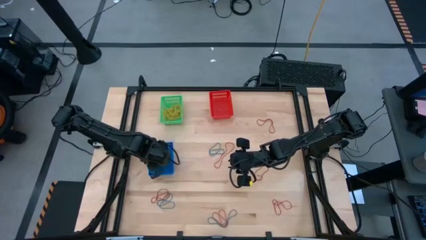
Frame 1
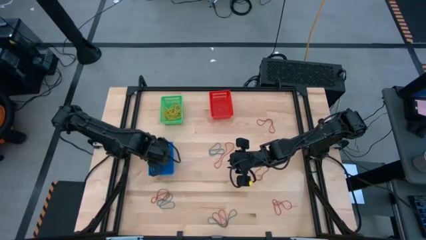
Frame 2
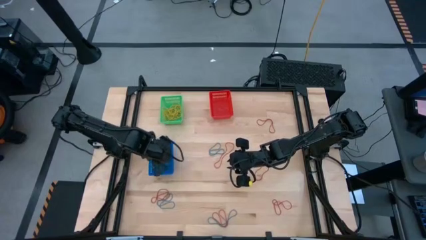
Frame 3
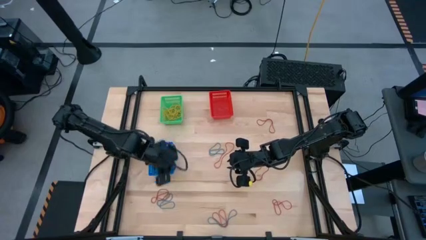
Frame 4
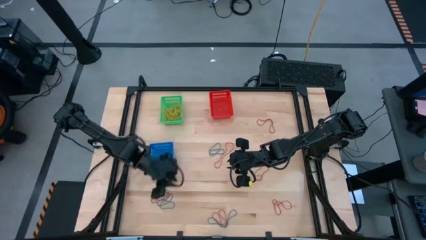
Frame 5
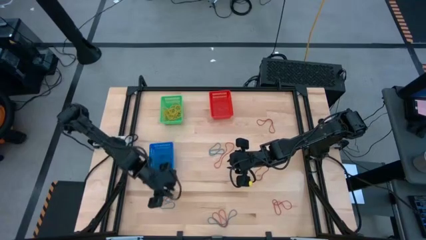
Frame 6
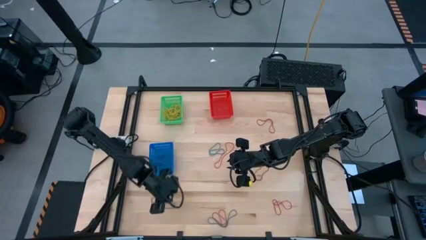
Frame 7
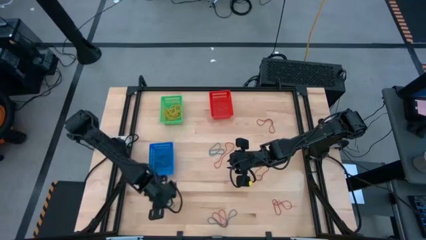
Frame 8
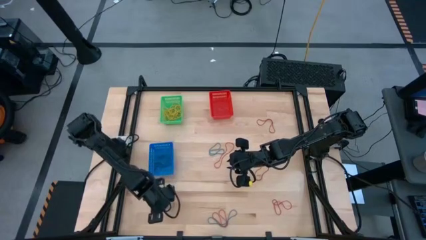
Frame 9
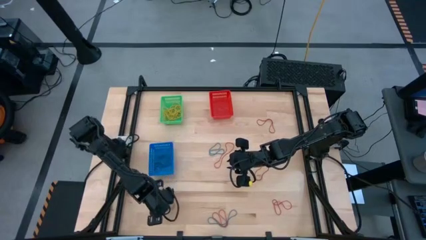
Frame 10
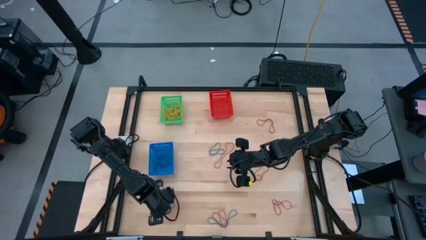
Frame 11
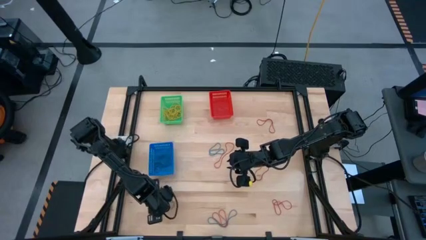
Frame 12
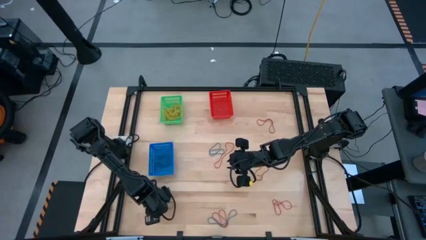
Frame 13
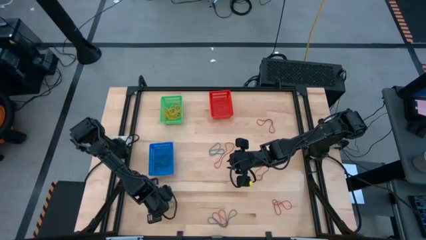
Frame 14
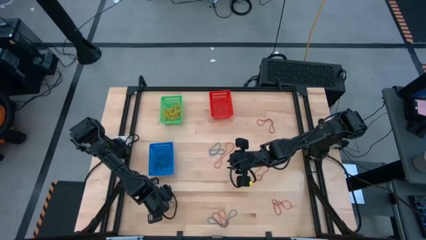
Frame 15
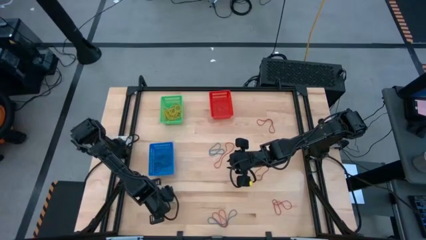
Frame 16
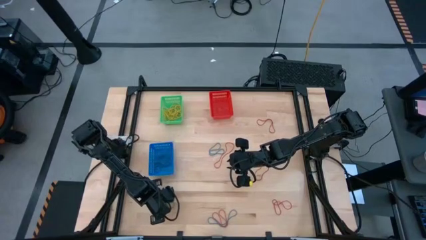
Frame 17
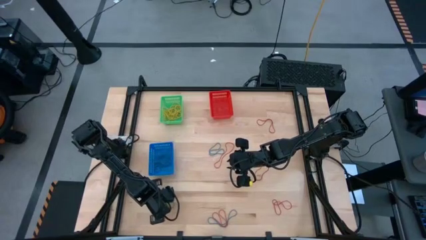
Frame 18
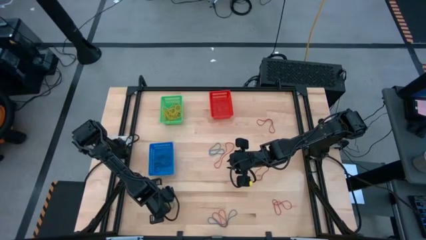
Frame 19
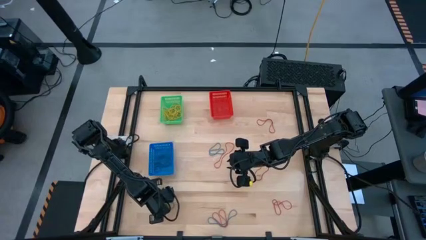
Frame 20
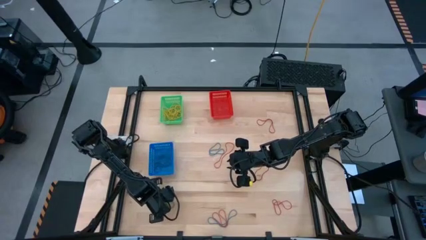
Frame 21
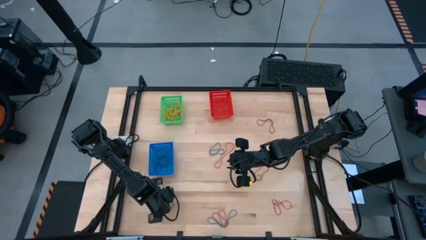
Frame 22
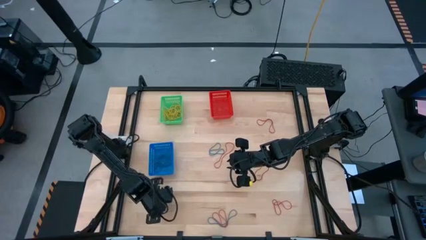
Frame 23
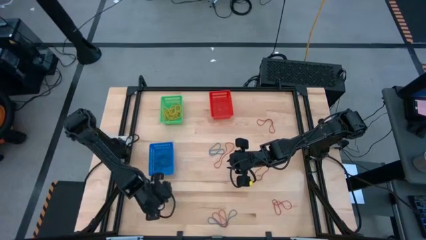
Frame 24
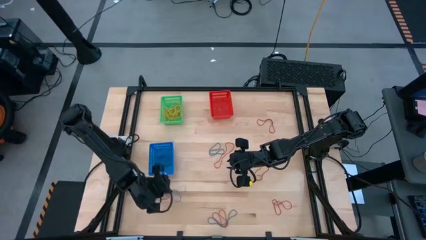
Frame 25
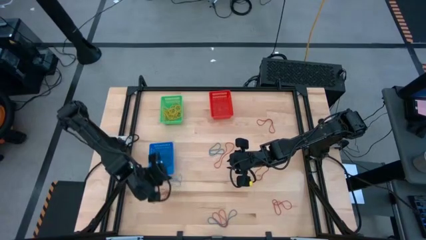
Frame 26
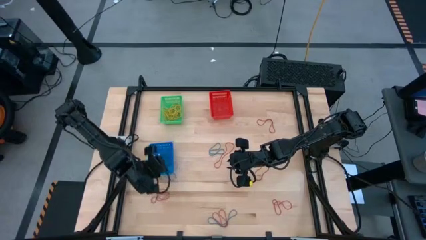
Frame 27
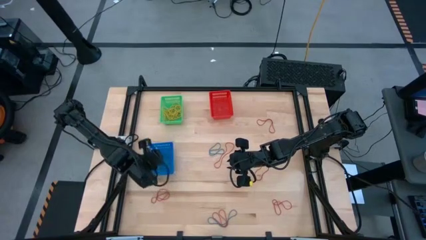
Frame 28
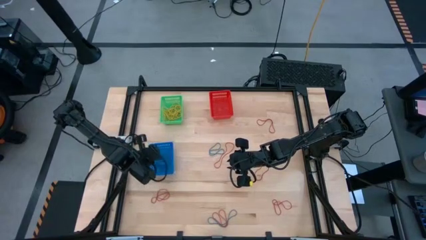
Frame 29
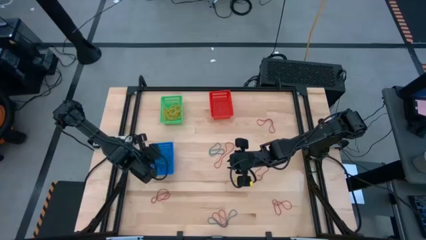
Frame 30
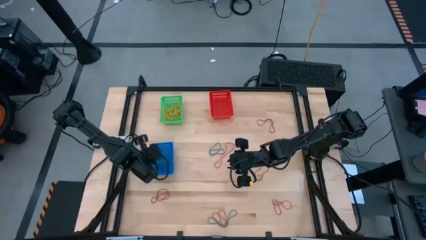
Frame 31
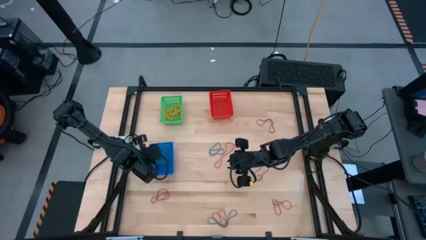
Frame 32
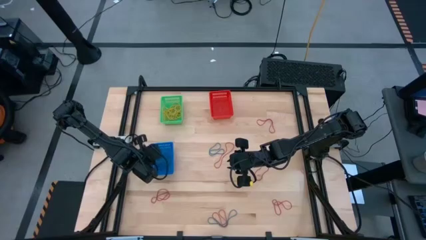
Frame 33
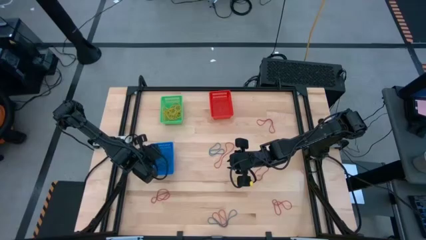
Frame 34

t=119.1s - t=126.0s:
Task: Sort rubber bands into baskets
Put the blue rubber band into the blue bin

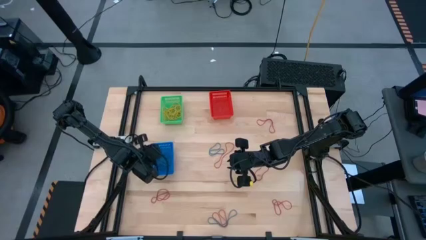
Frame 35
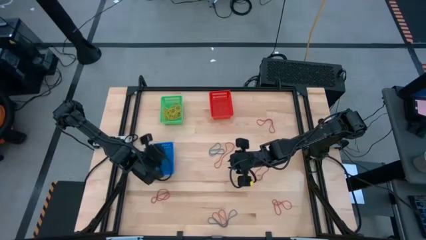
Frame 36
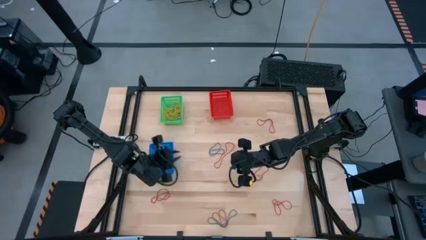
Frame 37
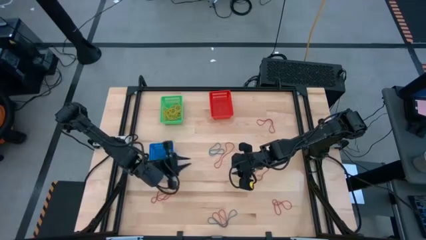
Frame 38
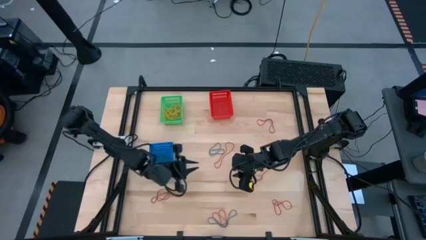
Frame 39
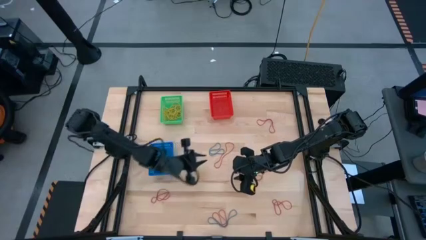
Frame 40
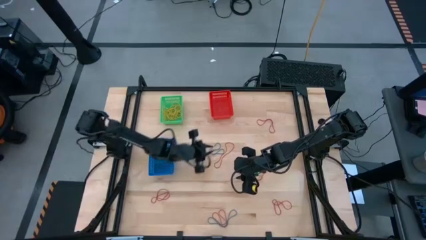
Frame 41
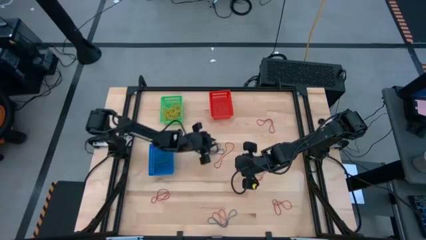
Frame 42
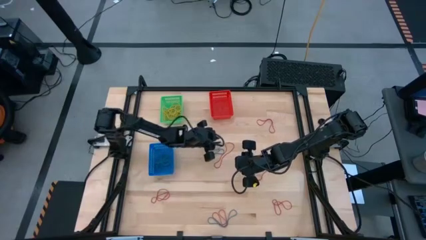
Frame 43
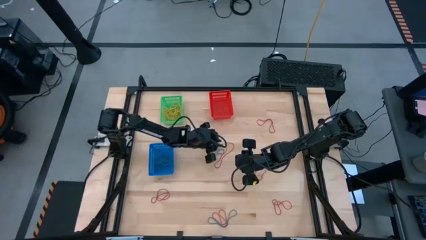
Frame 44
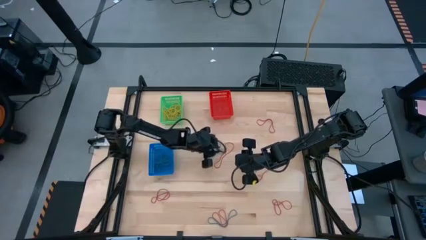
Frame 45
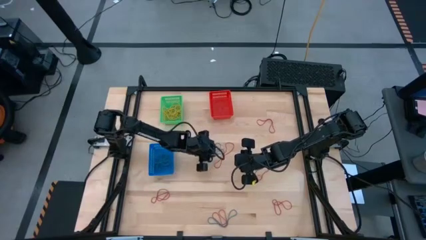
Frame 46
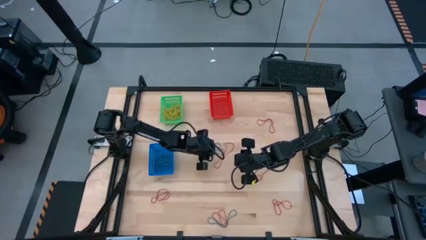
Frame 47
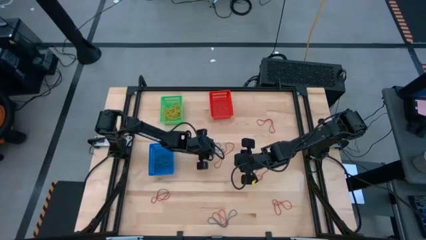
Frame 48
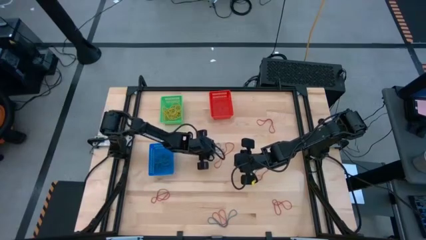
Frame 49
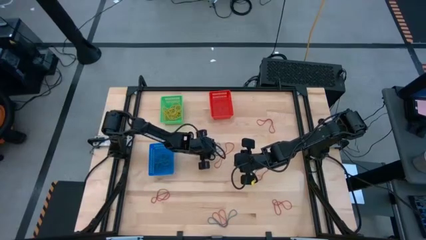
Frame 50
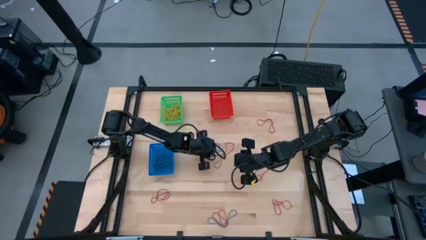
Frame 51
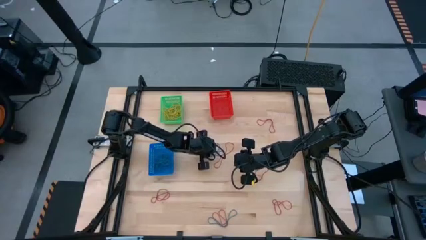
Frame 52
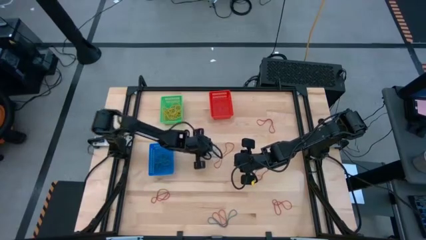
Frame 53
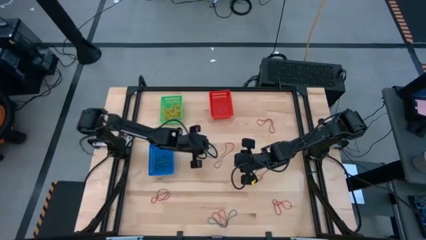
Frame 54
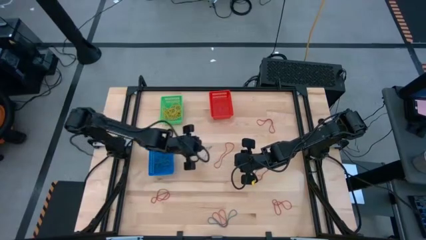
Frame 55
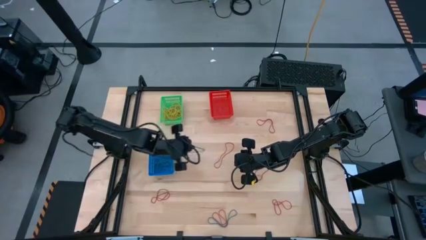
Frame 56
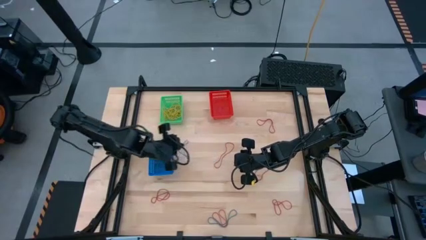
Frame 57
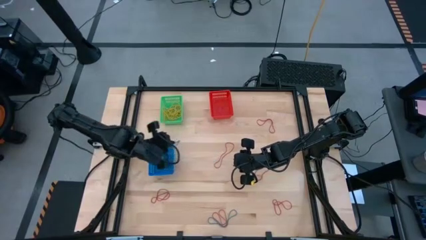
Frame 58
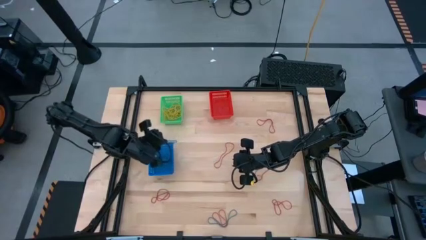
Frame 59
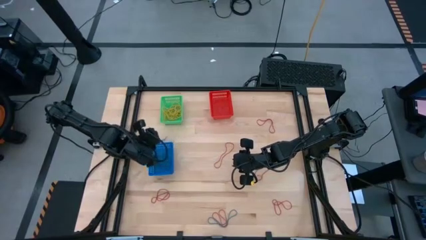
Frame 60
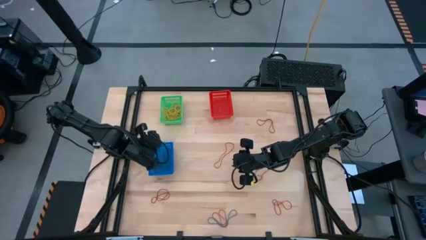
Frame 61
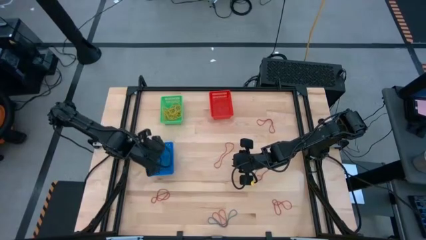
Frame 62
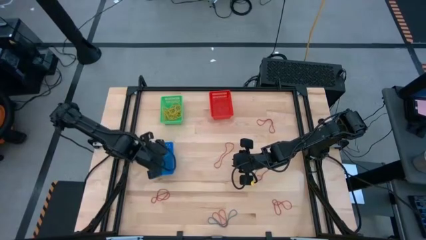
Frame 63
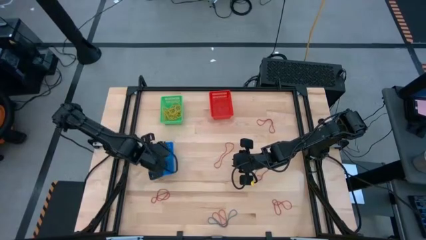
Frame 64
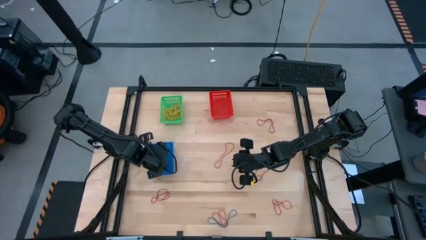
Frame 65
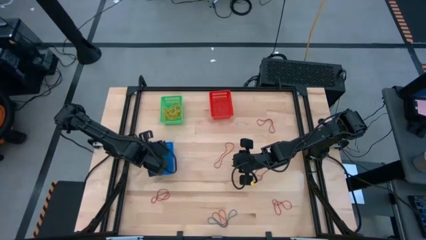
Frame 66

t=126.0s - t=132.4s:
Put the blue rubber band into the blue bin

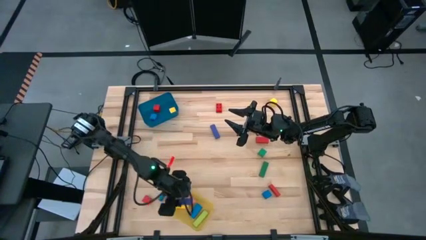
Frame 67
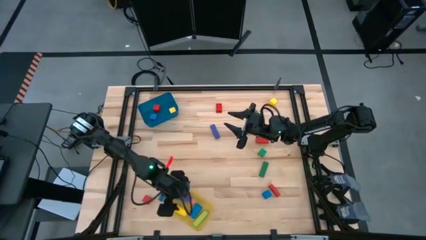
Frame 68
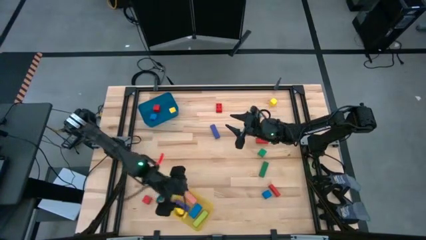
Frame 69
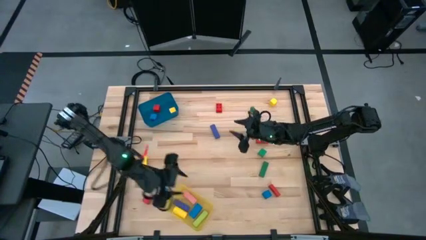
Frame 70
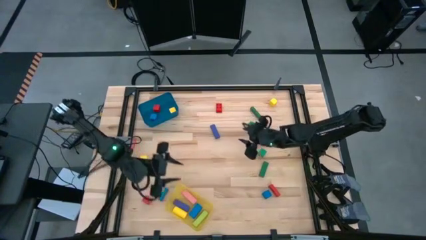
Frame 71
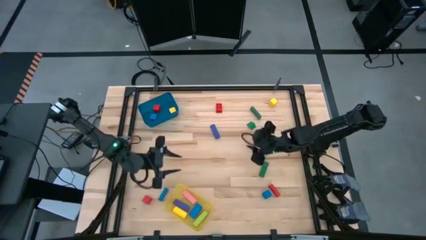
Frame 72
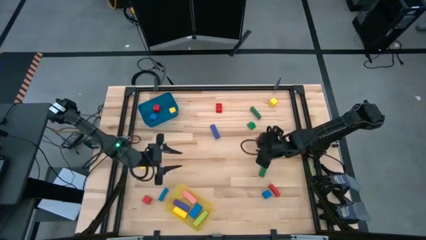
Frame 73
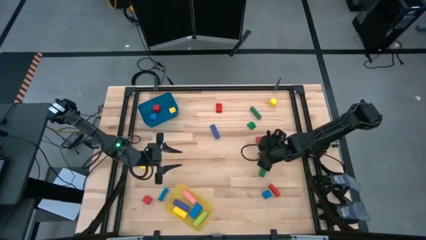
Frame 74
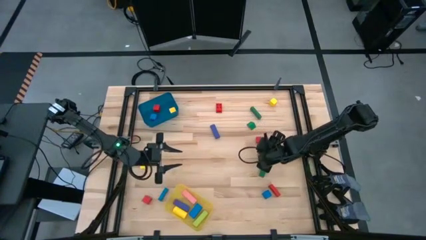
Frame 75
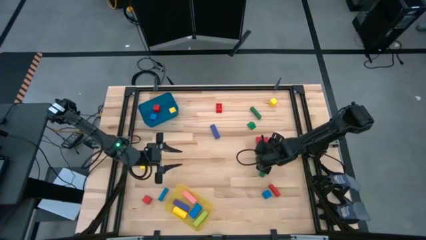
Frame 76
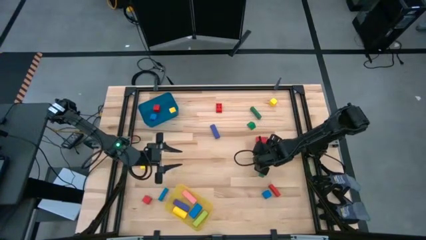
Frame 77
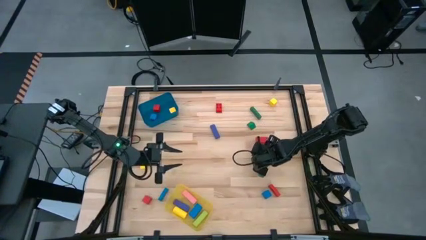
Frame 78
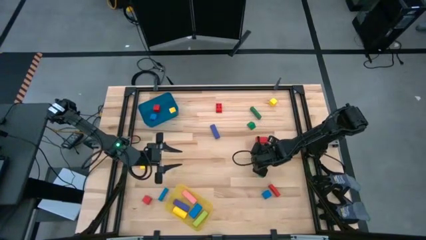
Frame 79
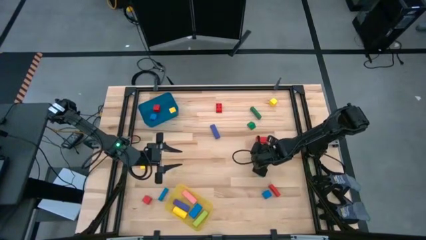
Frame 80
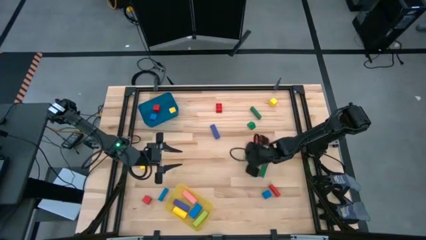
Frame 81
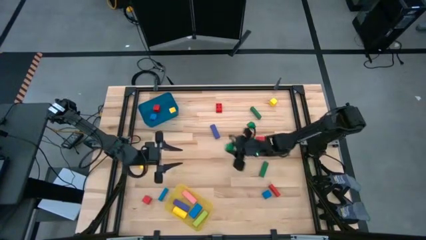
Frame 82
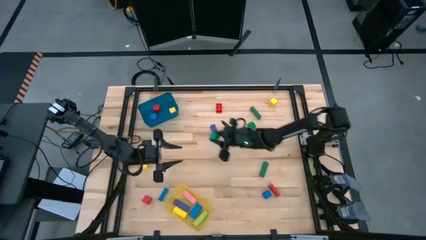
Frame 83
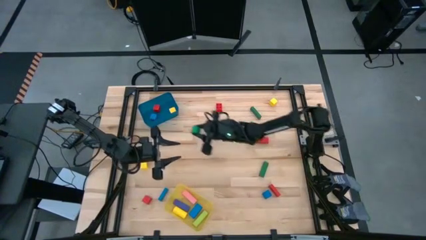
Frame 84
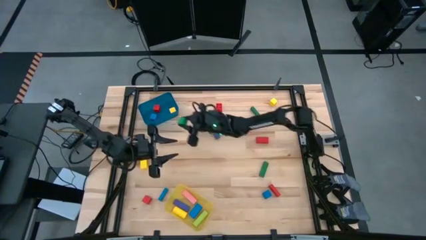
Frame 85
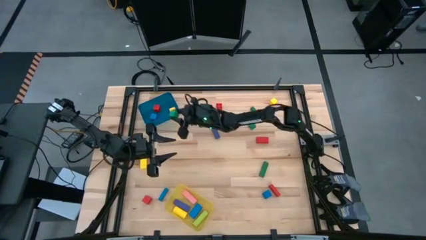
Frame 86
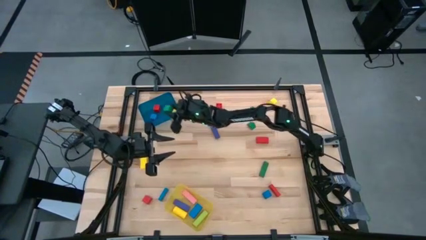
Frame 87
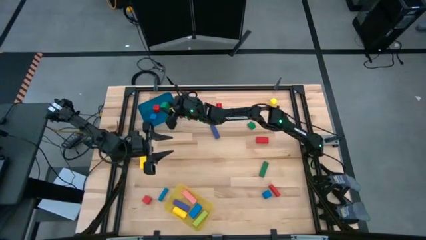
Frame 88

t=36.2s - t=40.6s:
Task: Sort blocks by size
Put the bottom small green block into the blue bin
